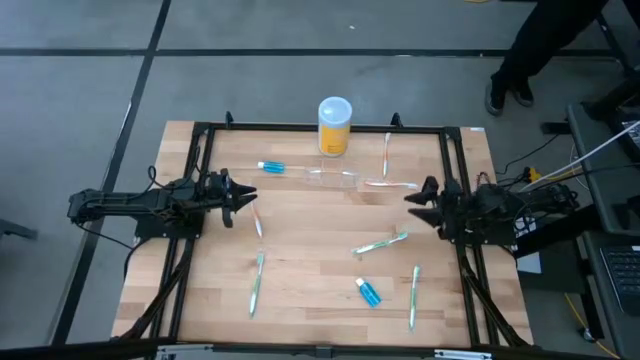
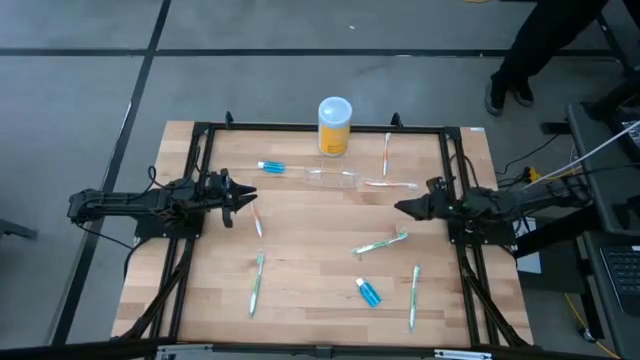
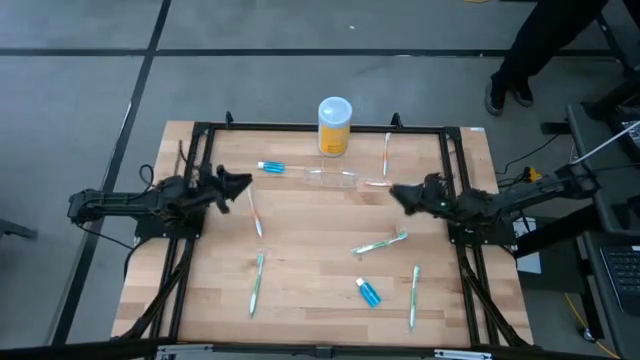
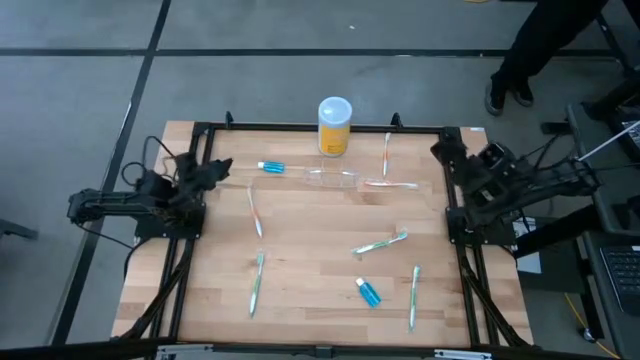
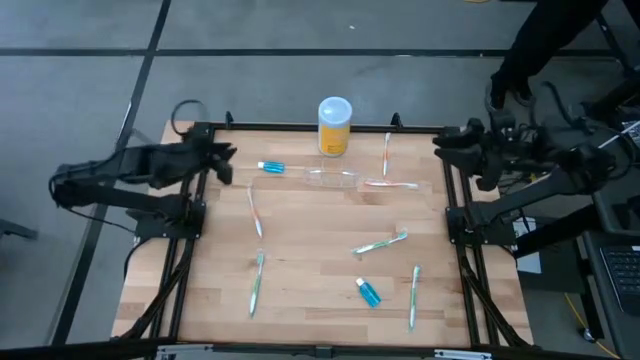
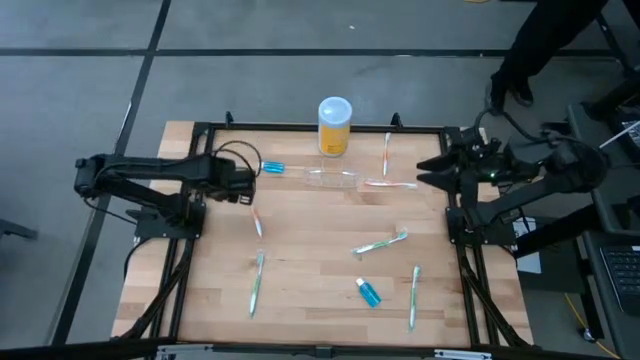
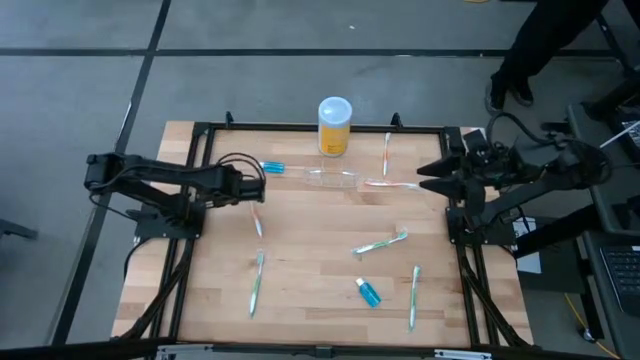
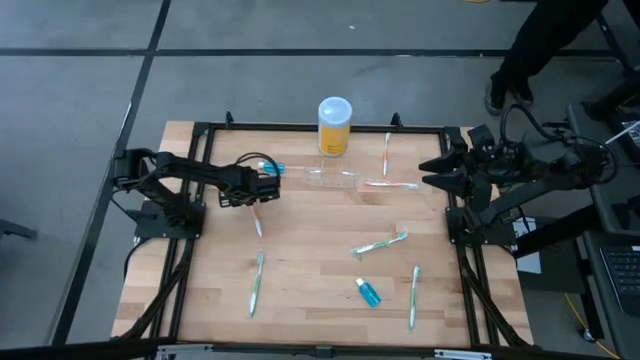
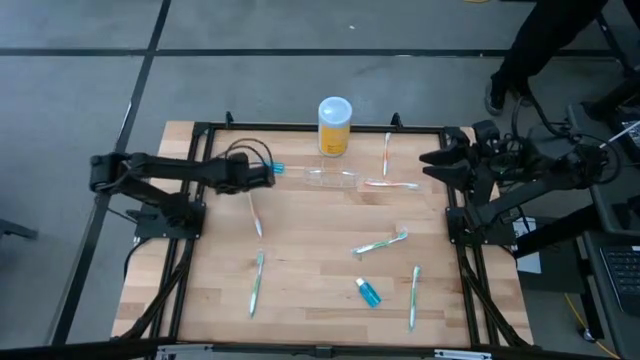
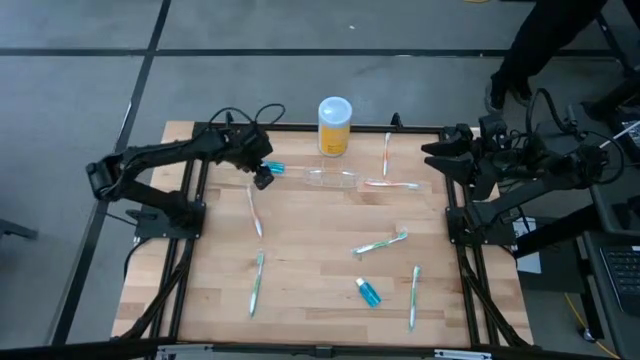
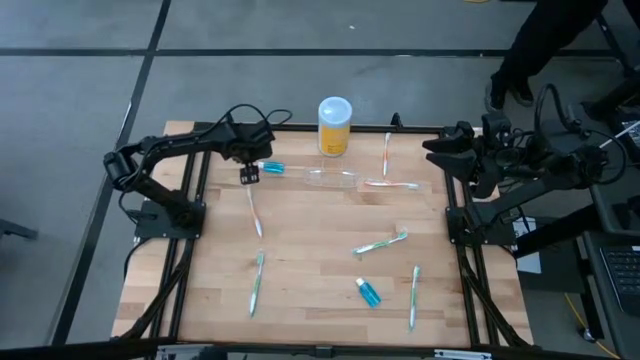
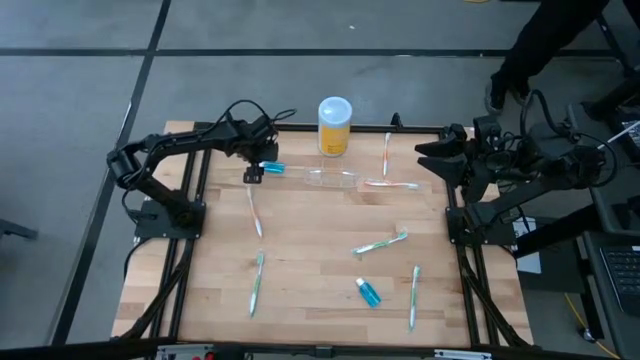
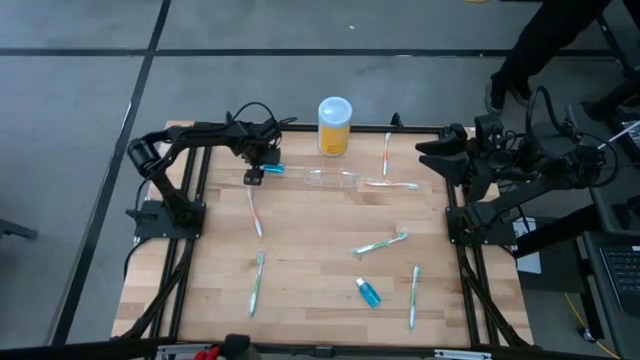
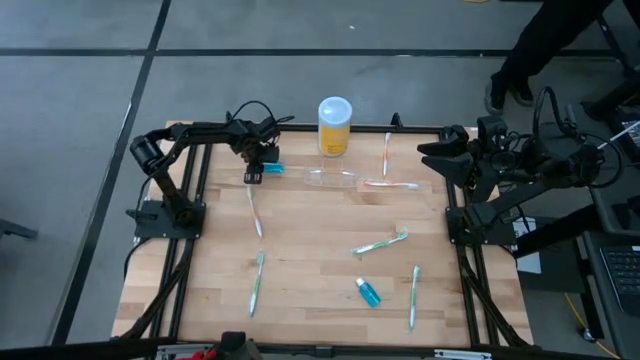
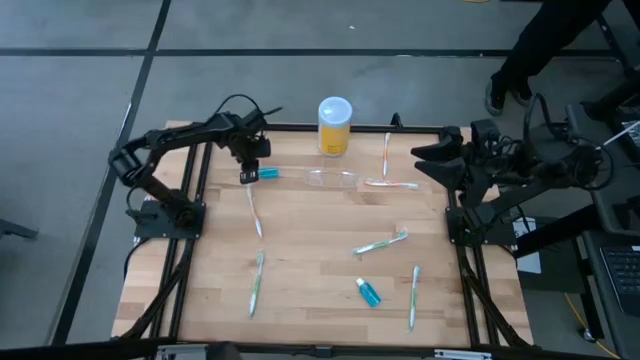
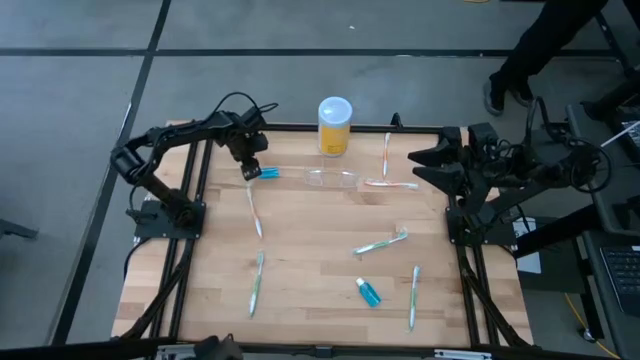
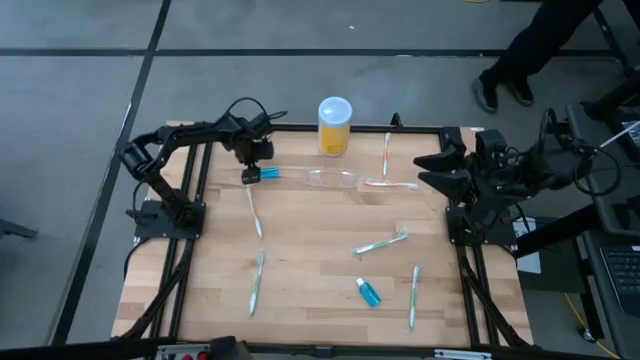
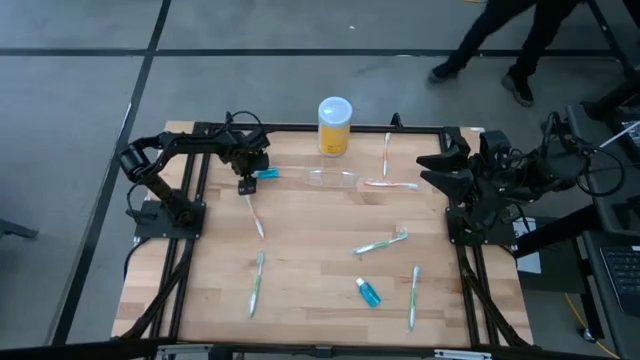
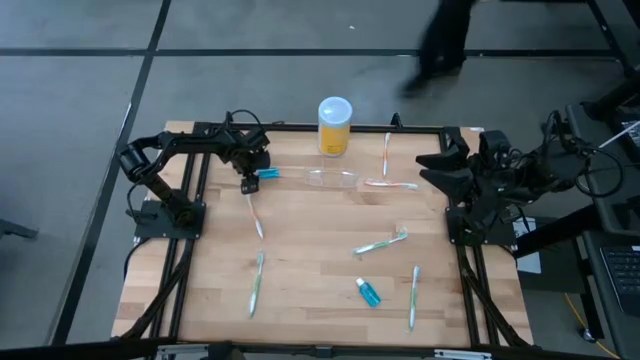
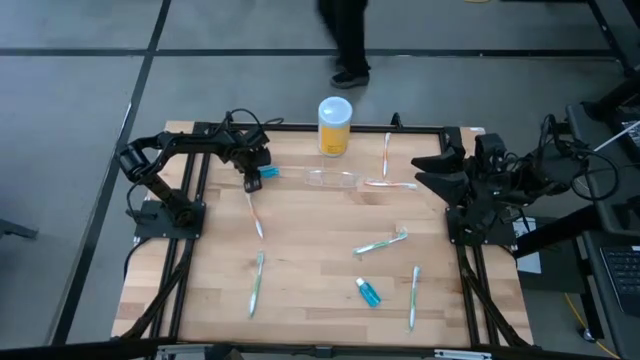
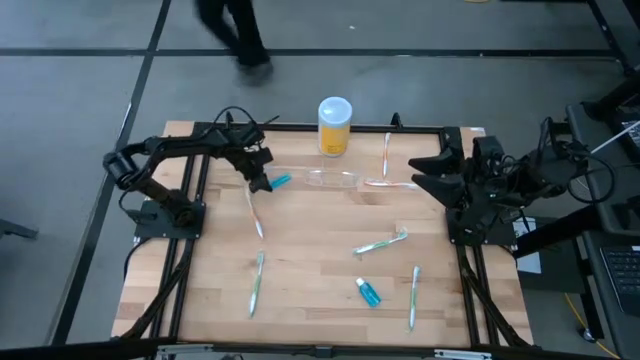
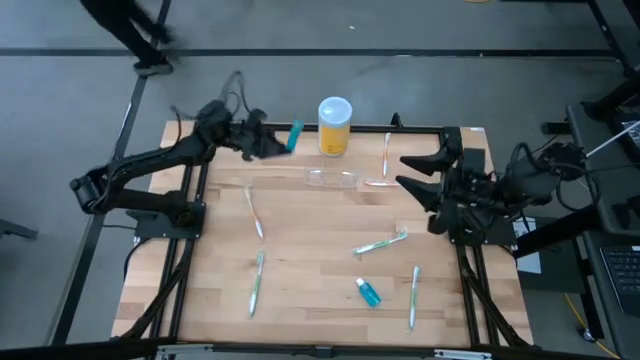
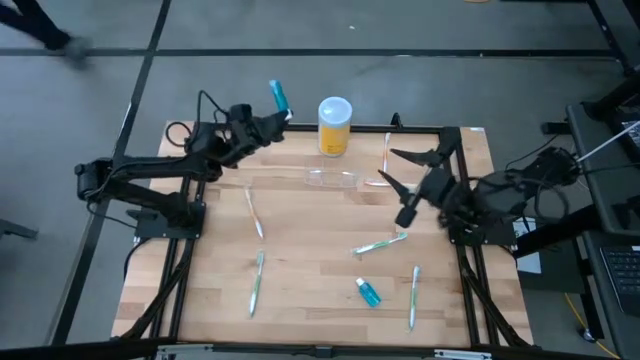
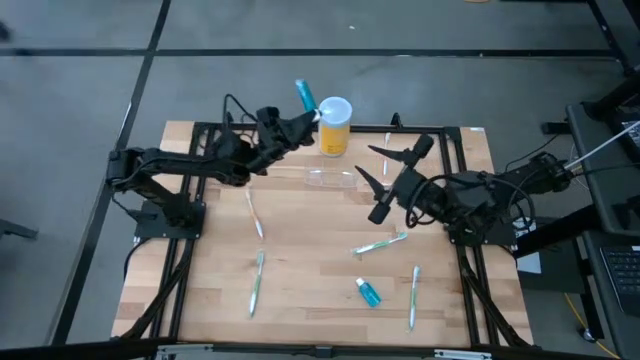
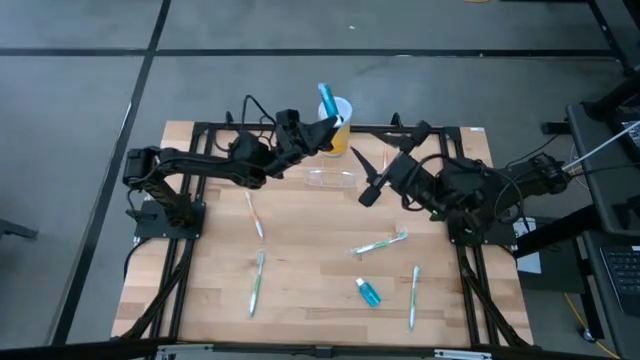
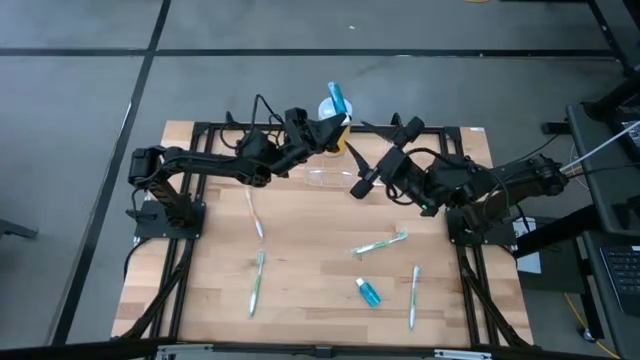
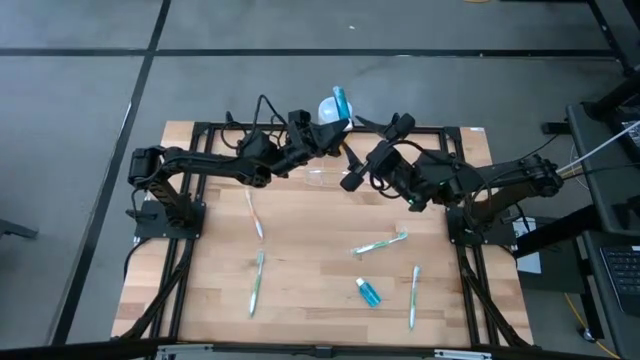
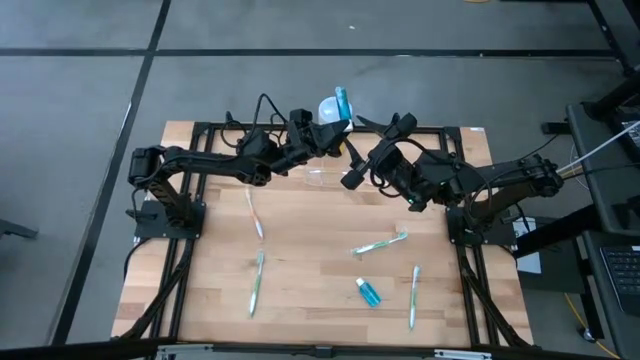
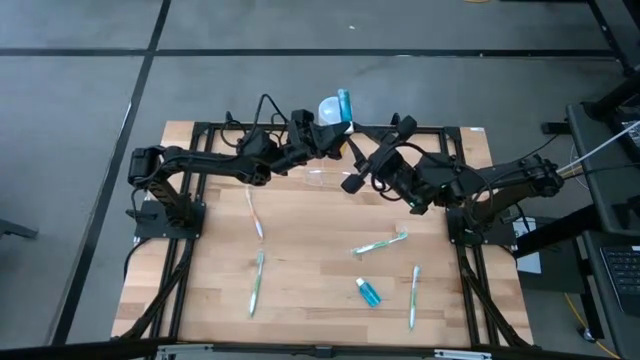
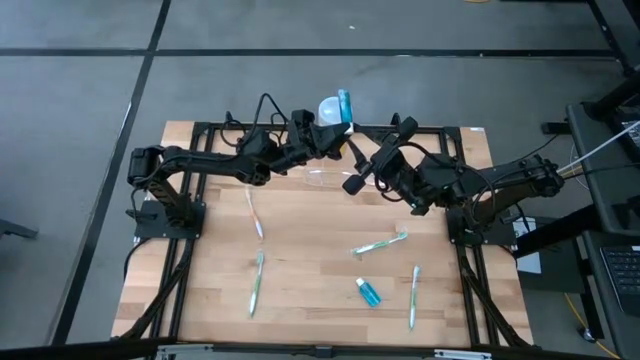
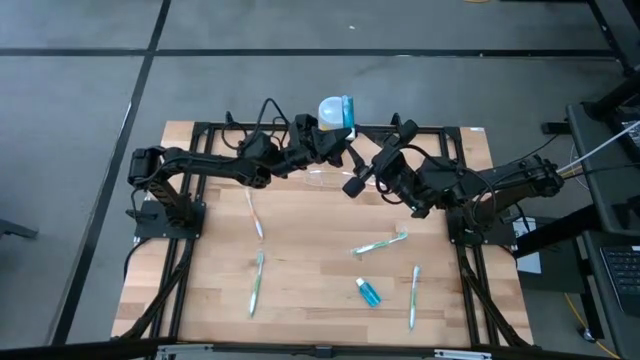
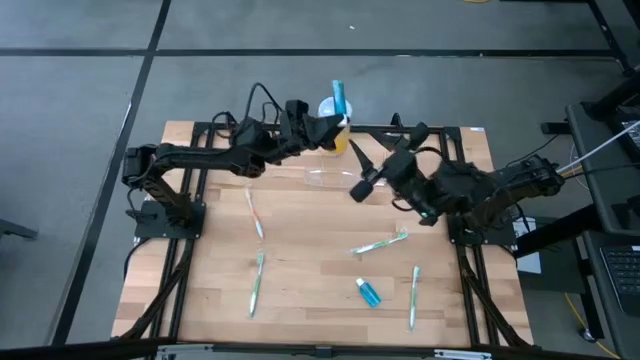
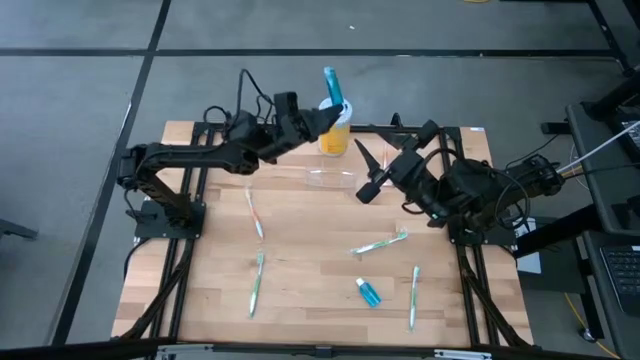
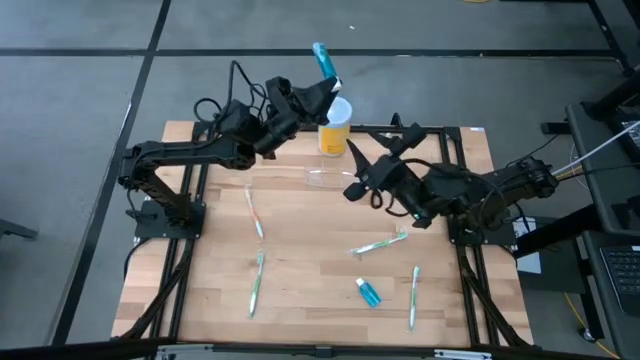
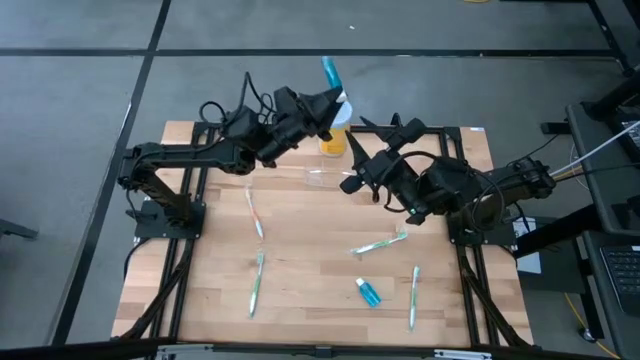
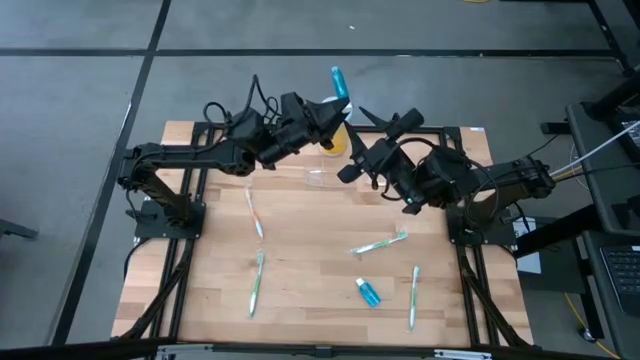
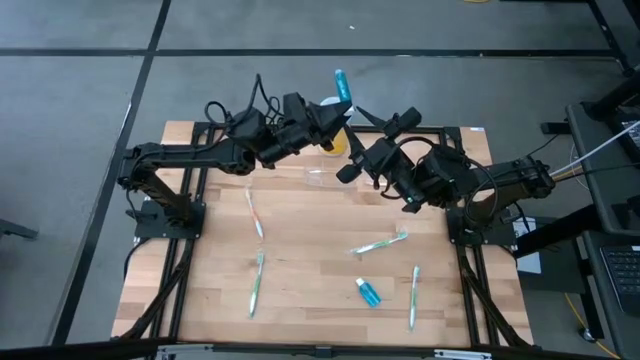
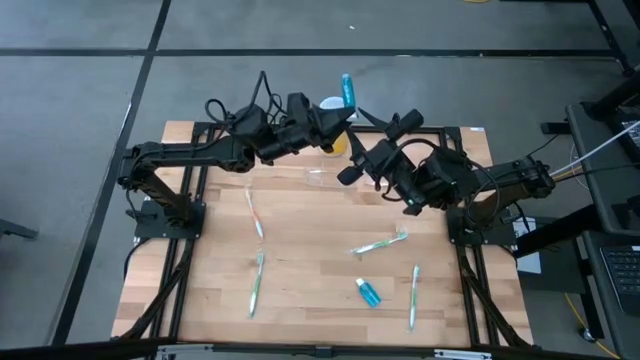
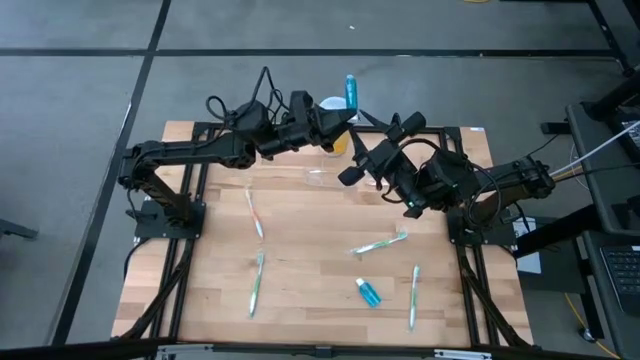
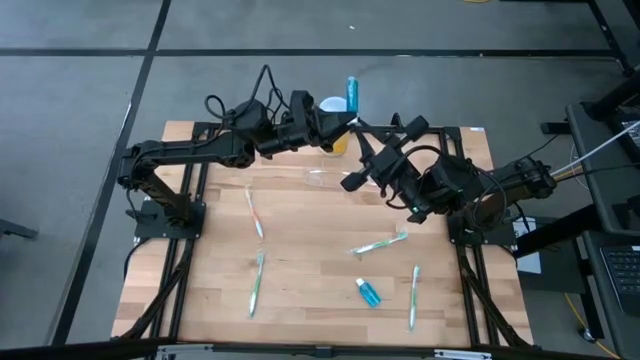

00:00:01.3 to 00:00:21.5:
Task: Pick & Place toothbrushing station
Put the top blue mouthwash into the transparent organizer
